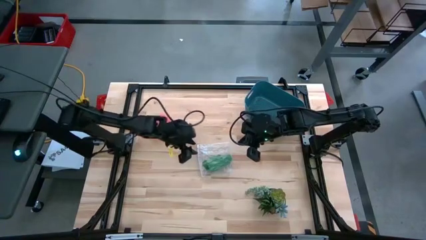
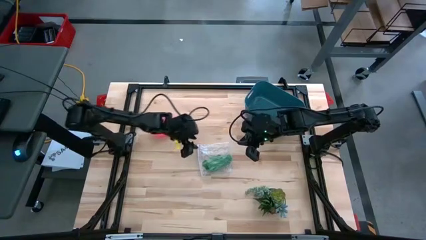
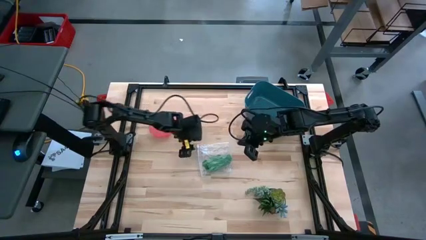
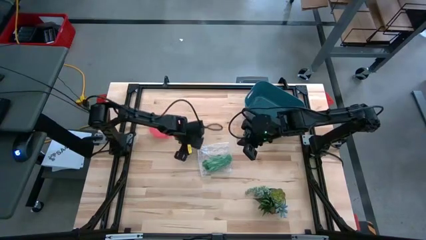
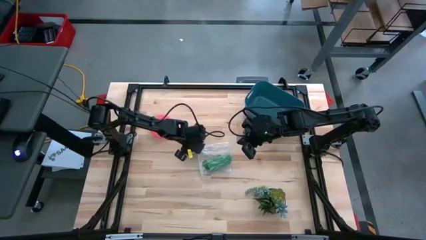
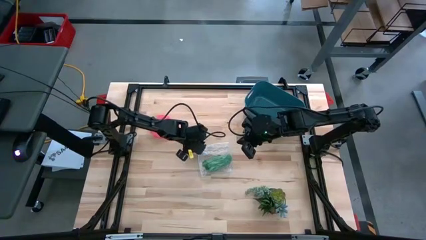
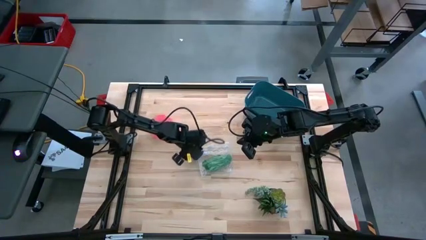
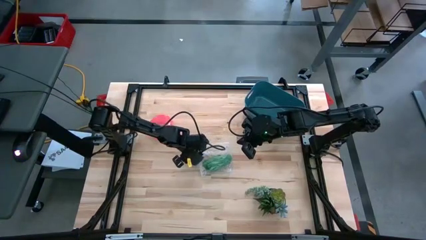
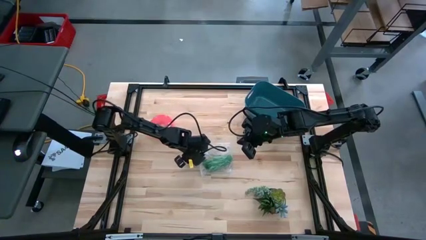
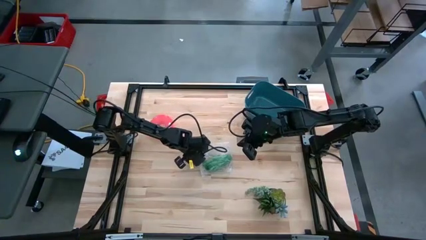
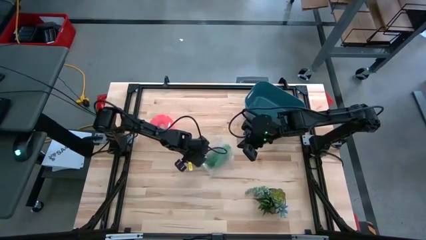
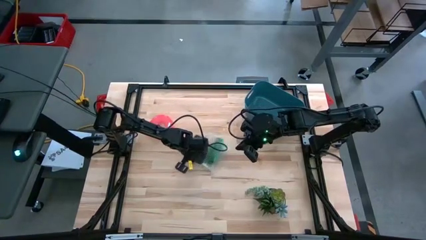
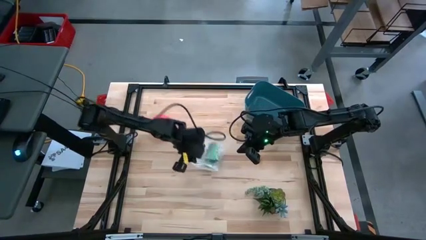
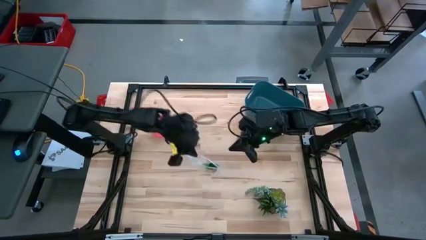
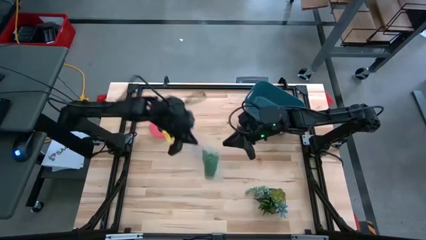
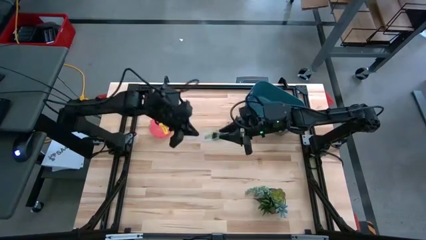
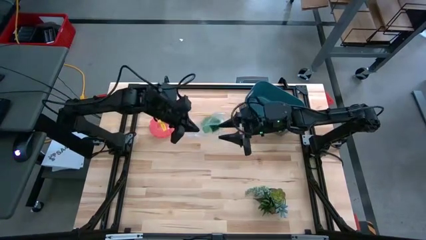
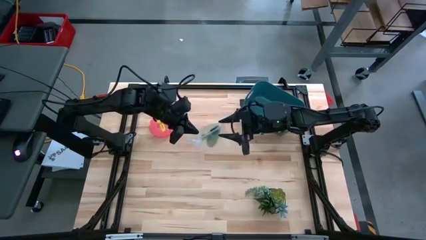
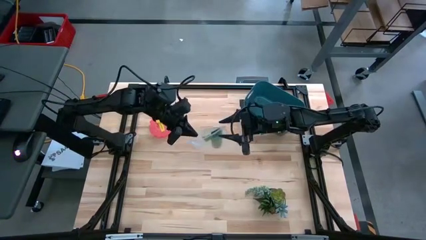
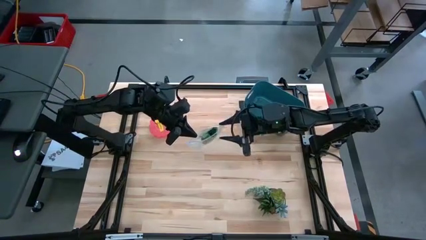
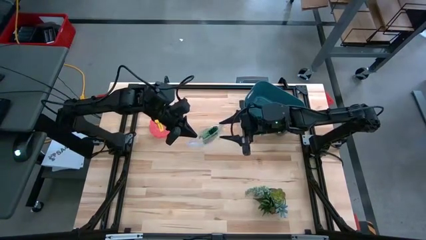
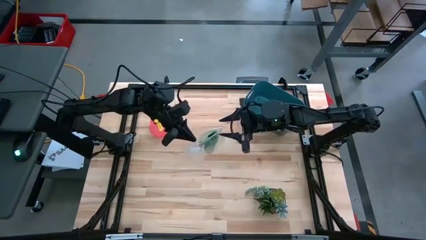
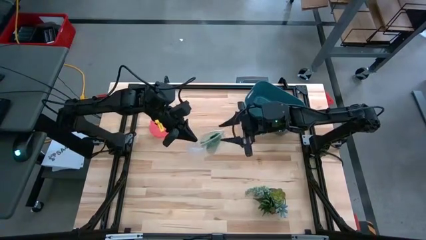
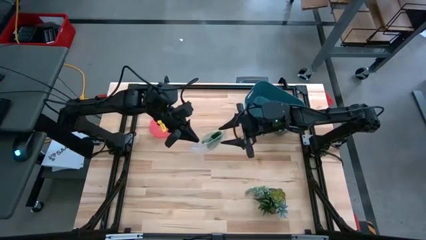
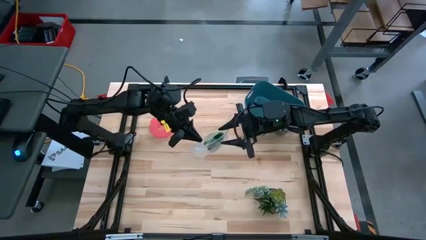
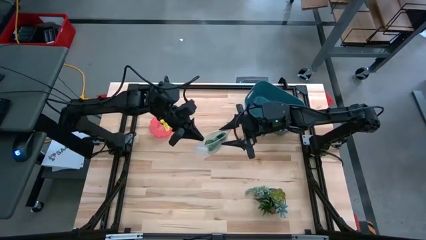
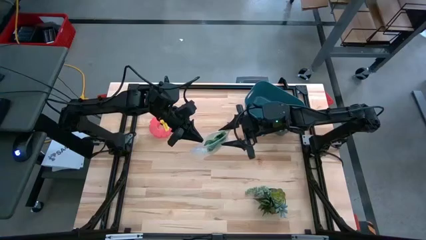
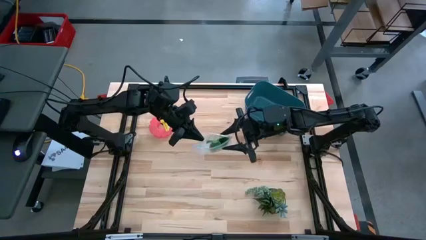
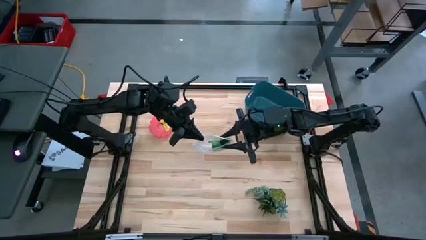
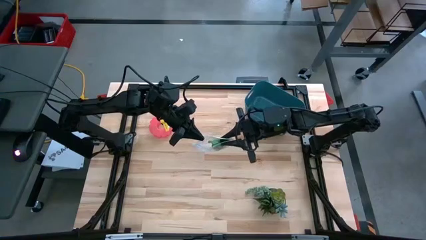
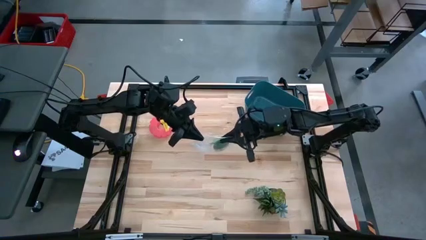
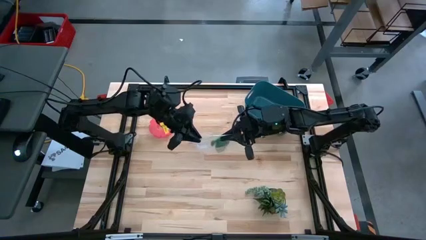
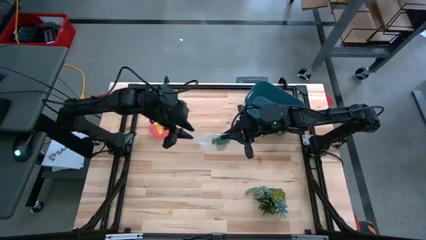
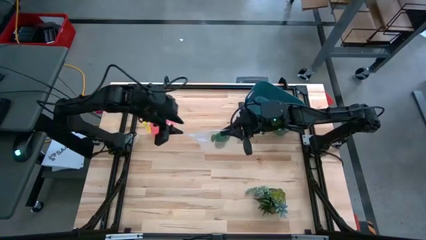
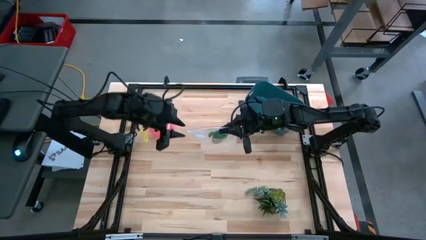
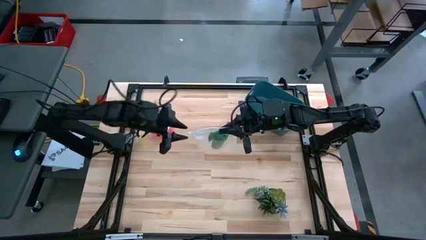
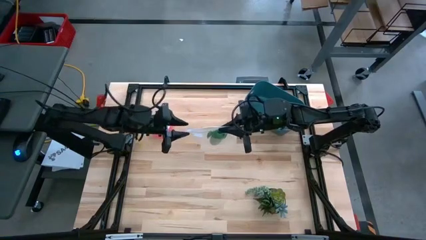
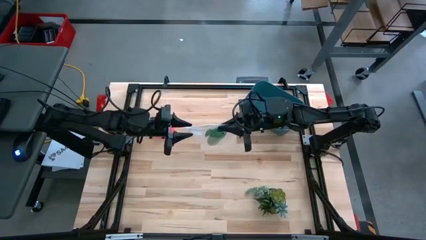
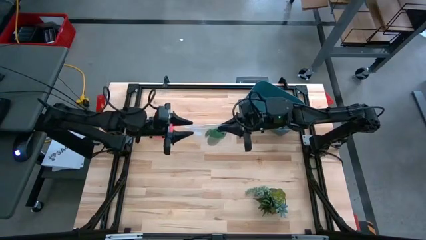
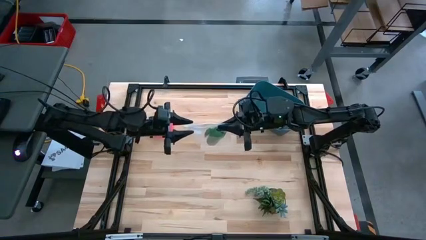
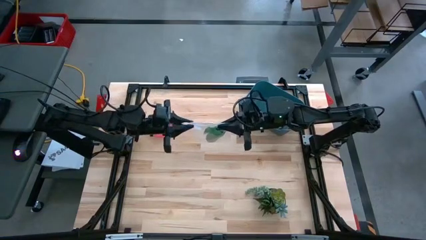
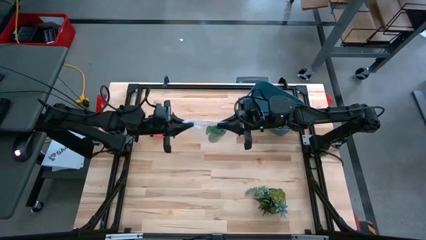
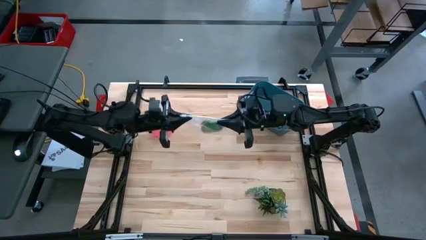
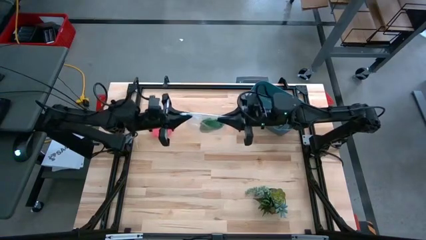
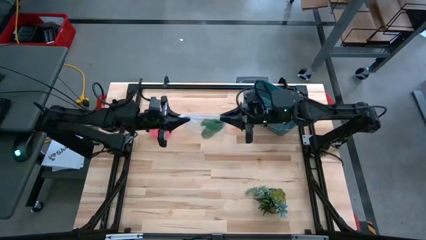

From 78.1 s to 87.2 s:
Task: Roll bandage
Close the transparent zip bag

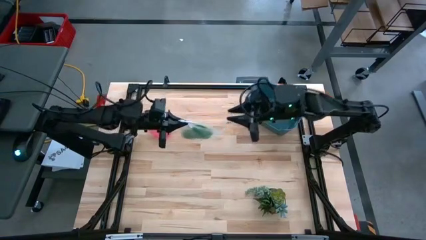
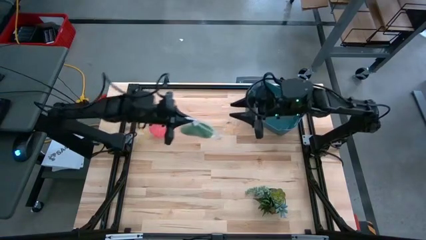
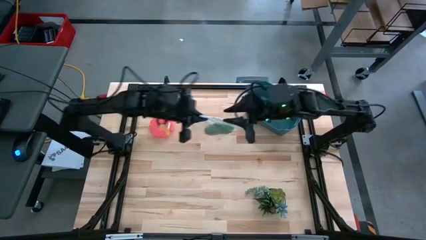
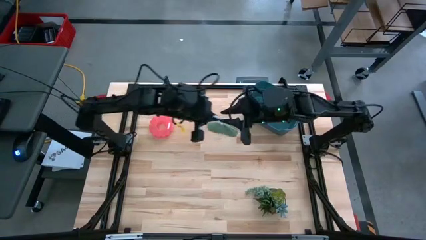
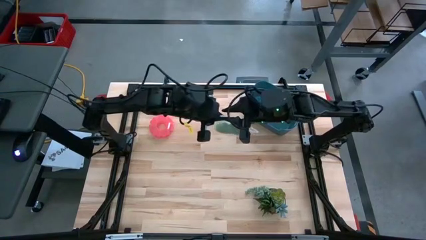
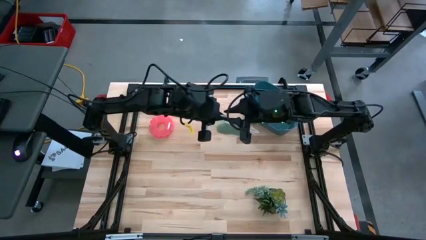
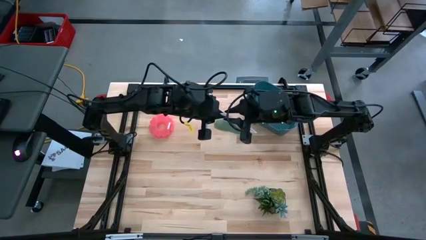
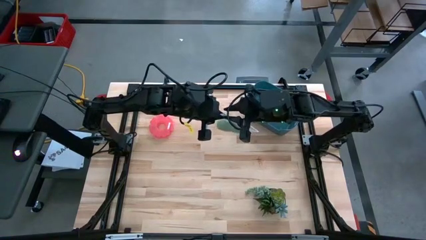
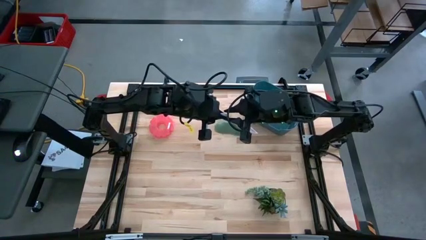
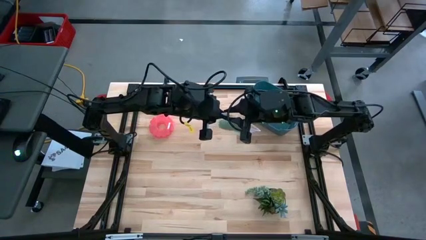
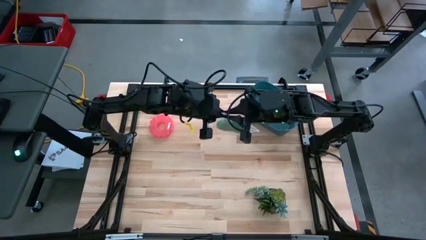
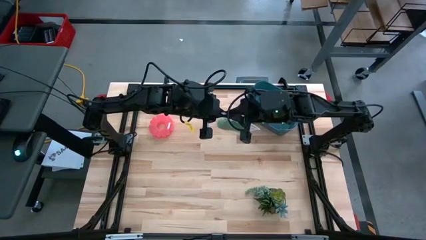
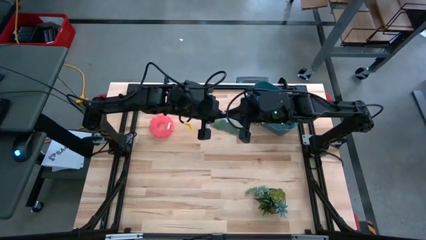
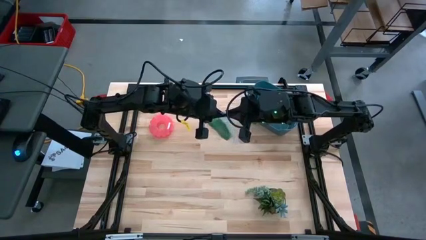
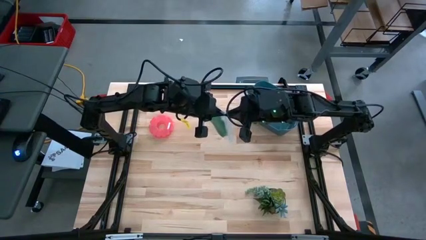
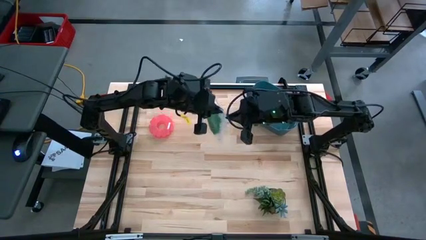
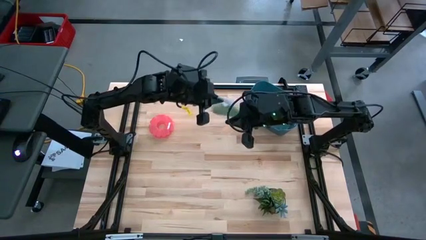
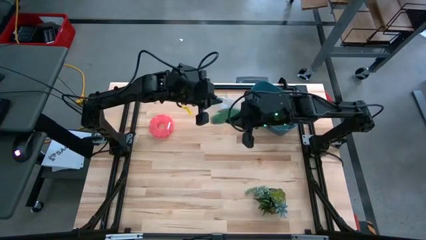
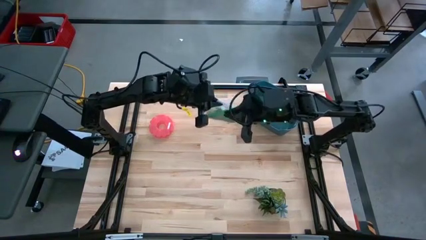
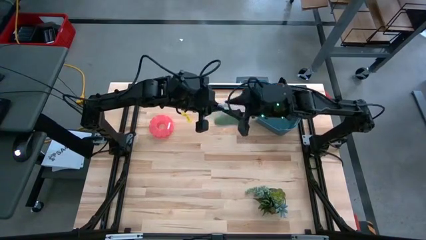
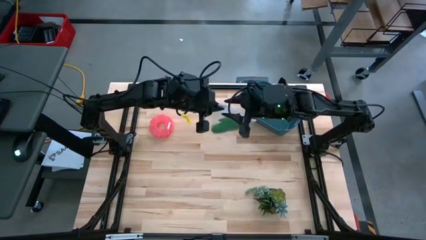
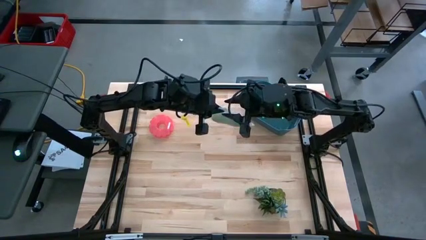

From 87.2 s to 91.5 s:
Close the transparent zip bag

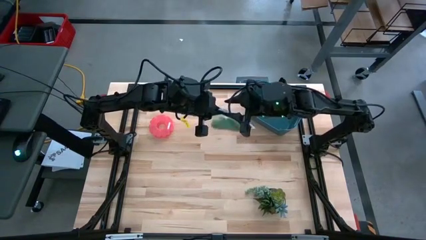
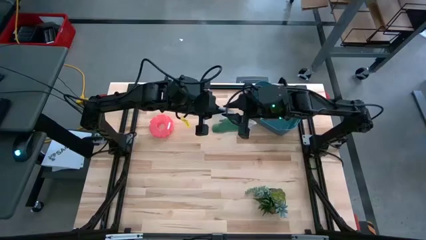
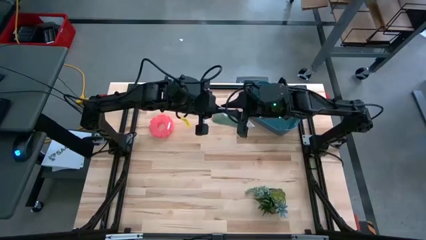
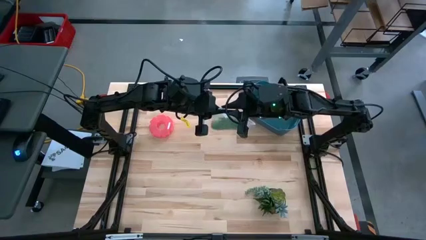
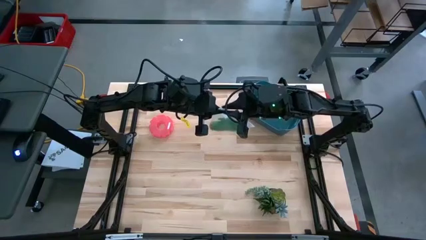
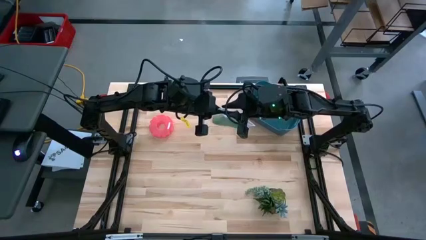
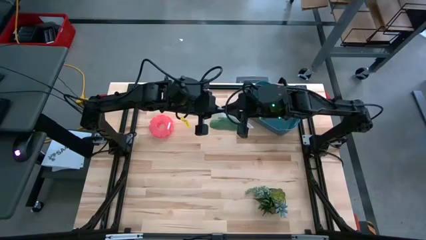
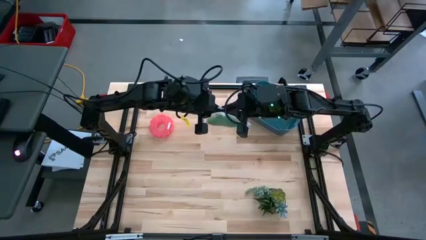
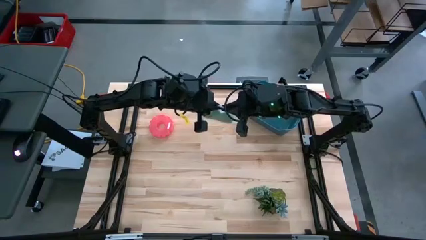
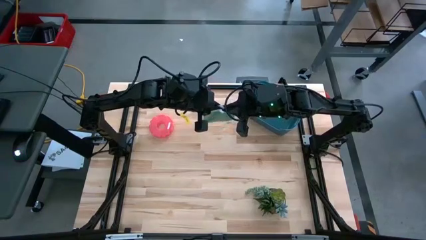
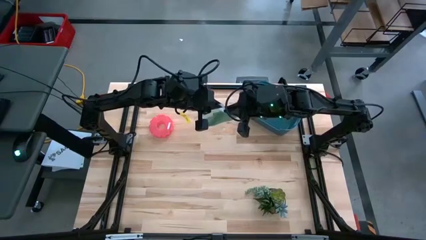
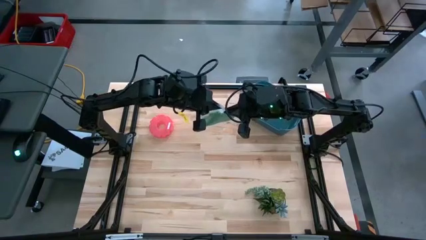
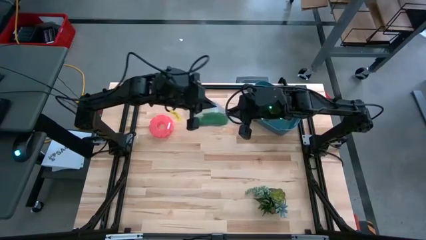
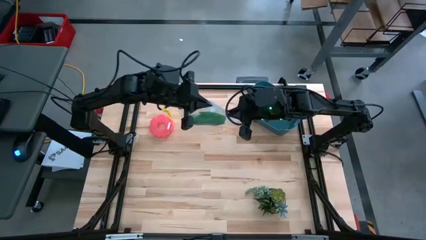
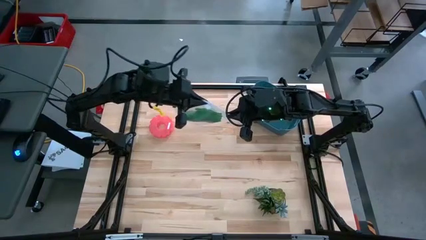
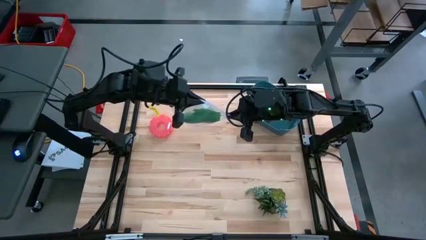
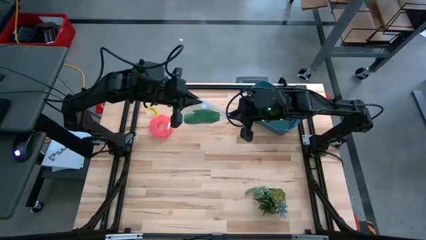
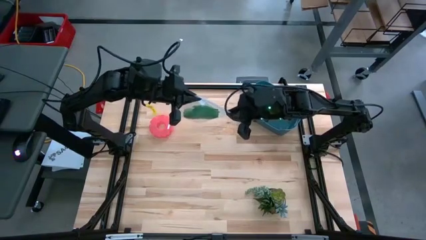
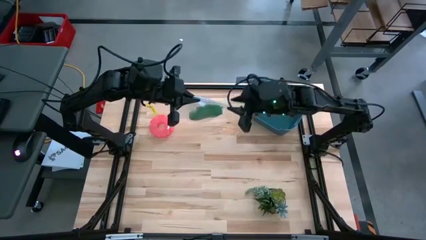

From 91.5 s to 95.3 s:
Close the transparent zip bag
